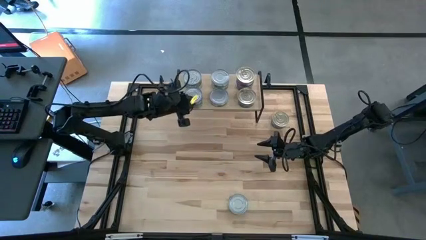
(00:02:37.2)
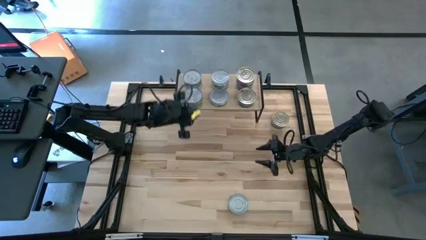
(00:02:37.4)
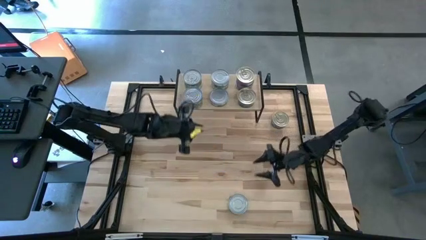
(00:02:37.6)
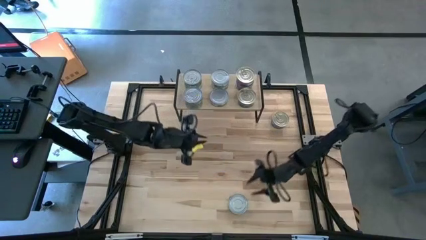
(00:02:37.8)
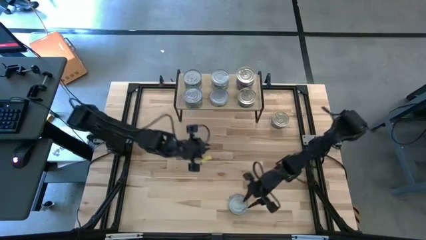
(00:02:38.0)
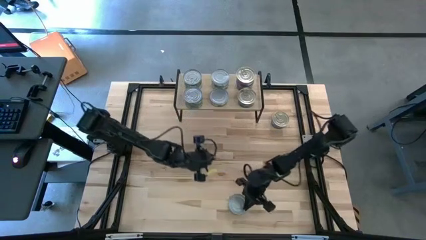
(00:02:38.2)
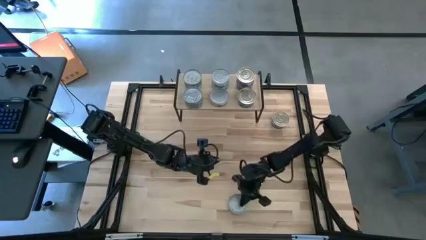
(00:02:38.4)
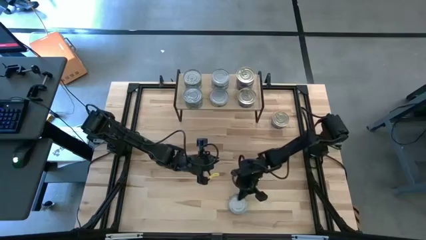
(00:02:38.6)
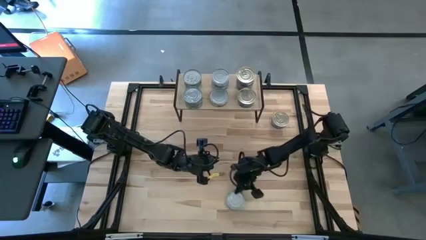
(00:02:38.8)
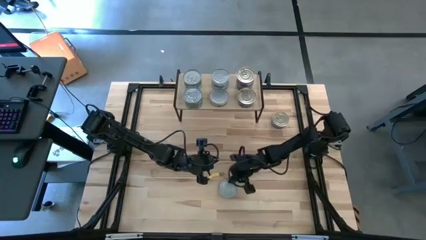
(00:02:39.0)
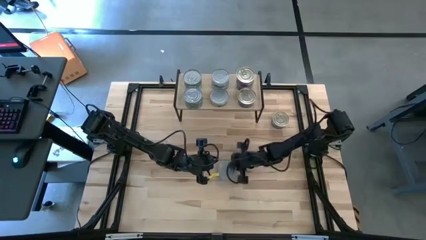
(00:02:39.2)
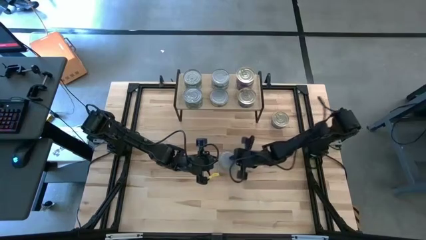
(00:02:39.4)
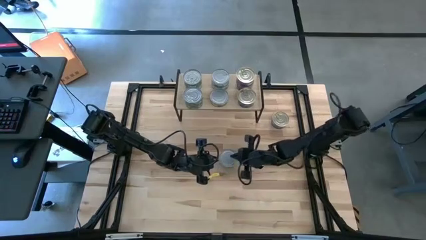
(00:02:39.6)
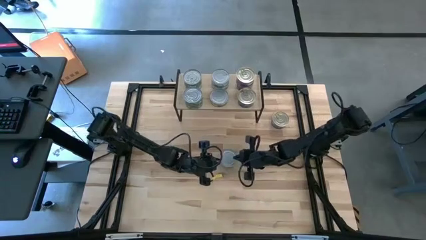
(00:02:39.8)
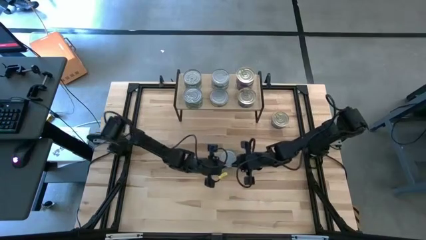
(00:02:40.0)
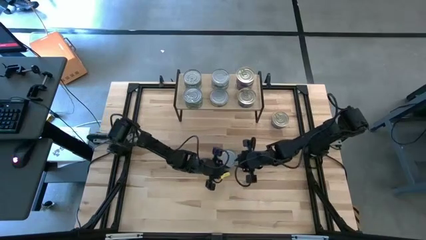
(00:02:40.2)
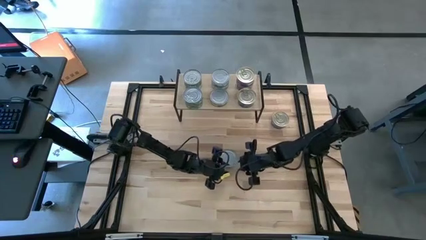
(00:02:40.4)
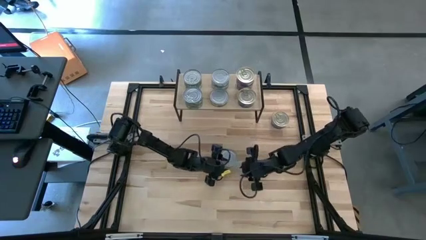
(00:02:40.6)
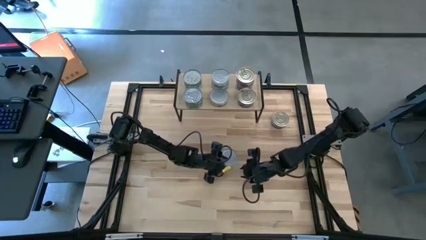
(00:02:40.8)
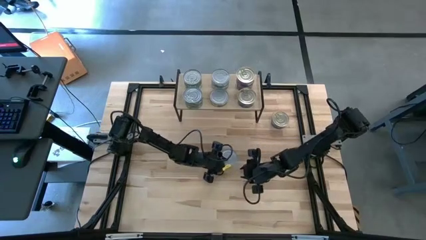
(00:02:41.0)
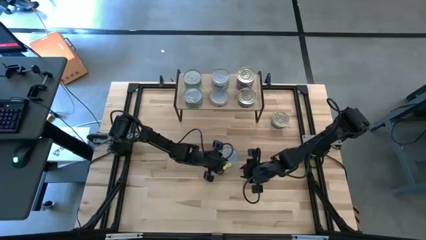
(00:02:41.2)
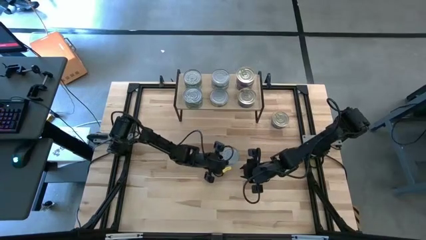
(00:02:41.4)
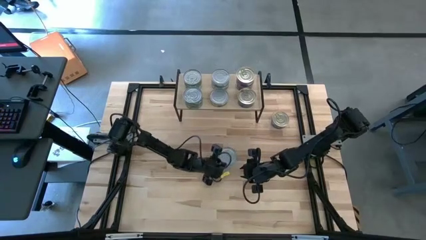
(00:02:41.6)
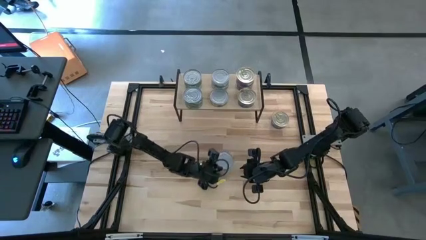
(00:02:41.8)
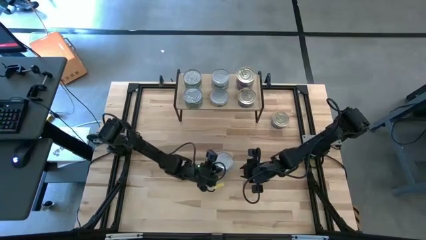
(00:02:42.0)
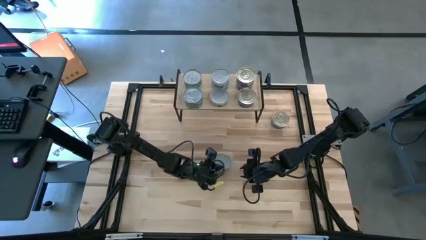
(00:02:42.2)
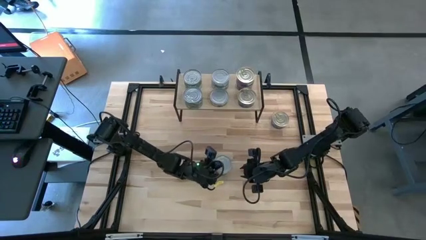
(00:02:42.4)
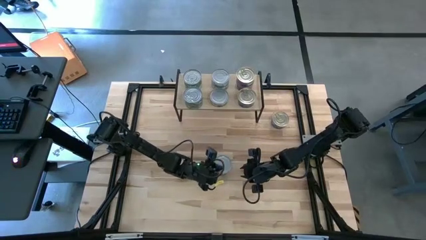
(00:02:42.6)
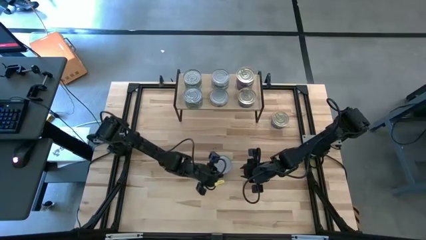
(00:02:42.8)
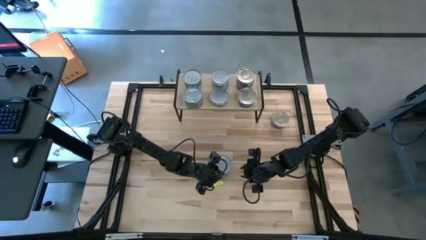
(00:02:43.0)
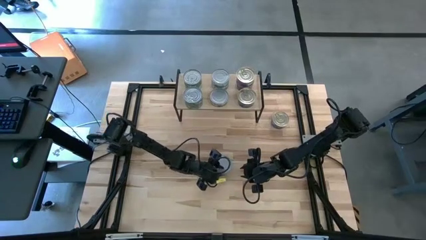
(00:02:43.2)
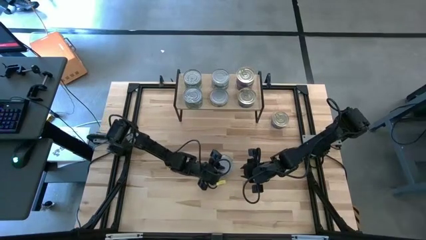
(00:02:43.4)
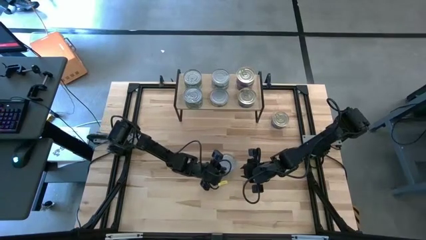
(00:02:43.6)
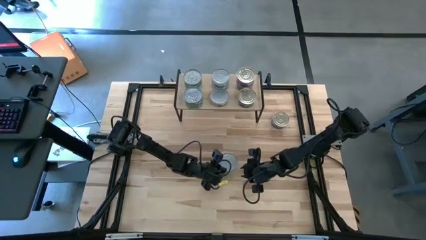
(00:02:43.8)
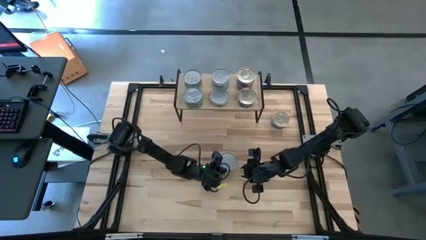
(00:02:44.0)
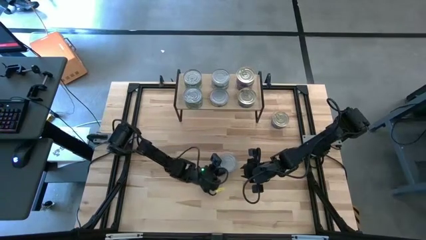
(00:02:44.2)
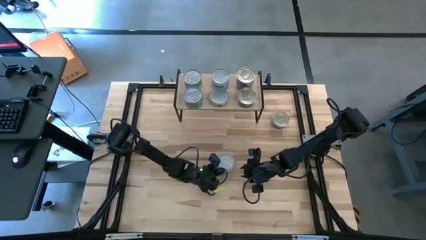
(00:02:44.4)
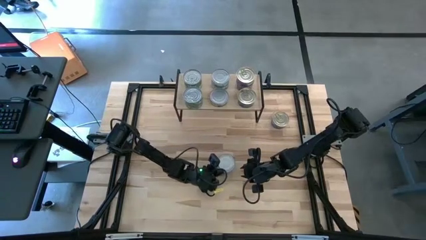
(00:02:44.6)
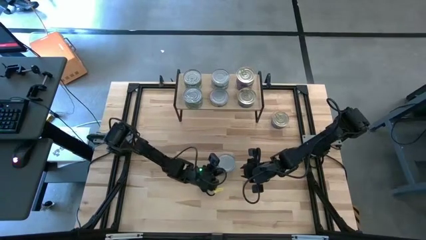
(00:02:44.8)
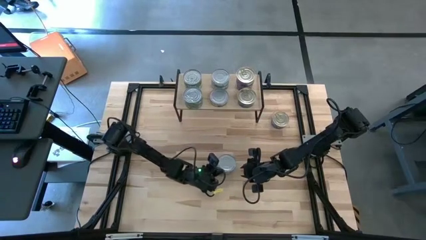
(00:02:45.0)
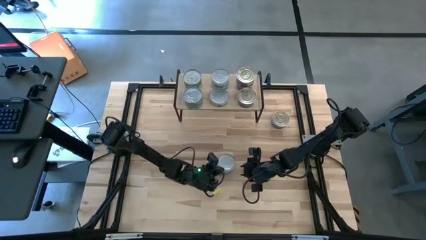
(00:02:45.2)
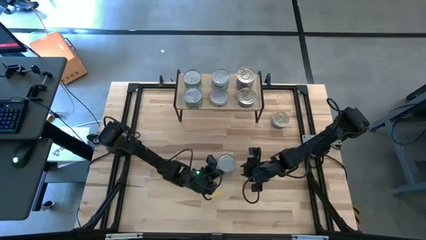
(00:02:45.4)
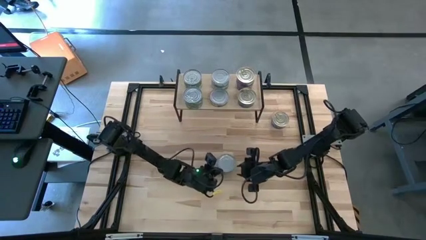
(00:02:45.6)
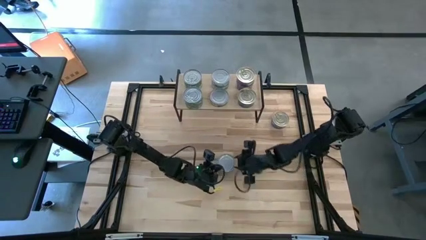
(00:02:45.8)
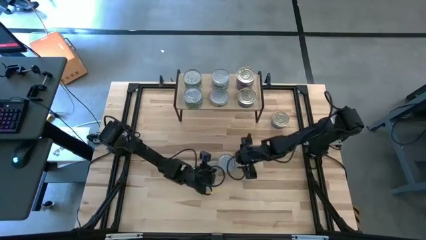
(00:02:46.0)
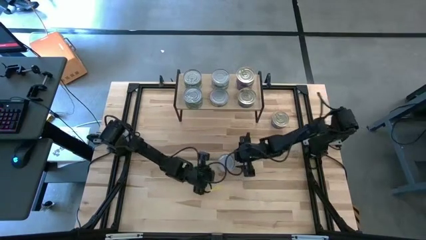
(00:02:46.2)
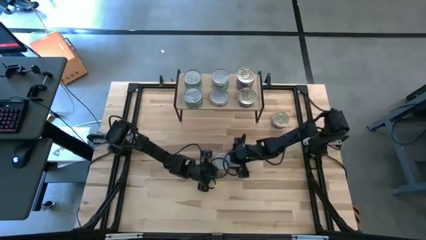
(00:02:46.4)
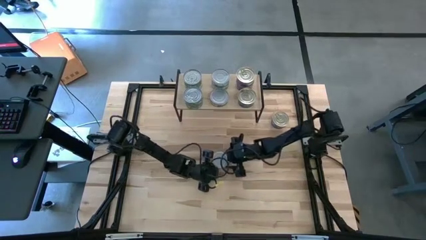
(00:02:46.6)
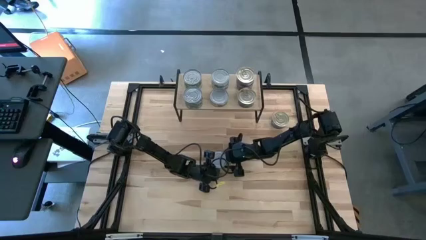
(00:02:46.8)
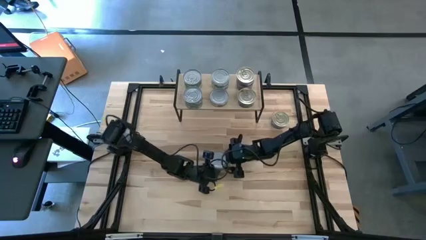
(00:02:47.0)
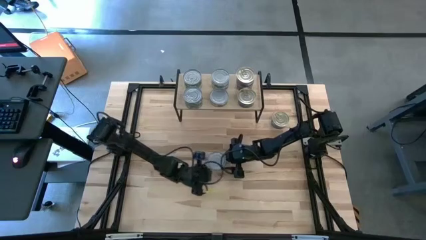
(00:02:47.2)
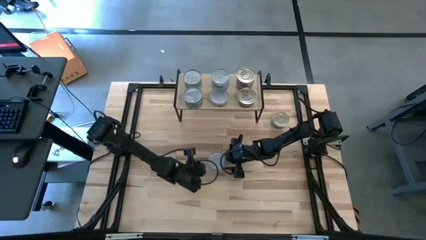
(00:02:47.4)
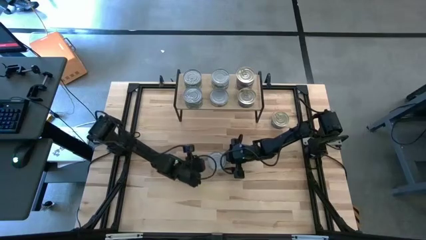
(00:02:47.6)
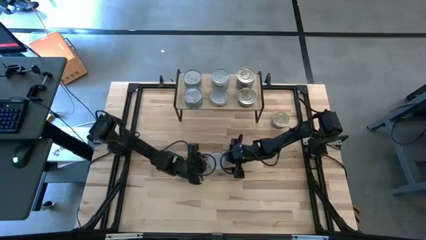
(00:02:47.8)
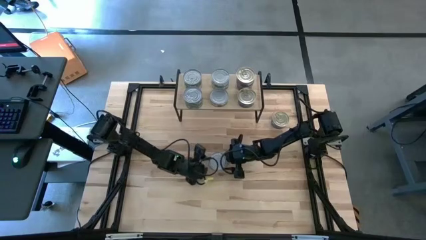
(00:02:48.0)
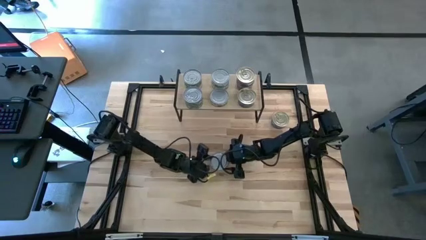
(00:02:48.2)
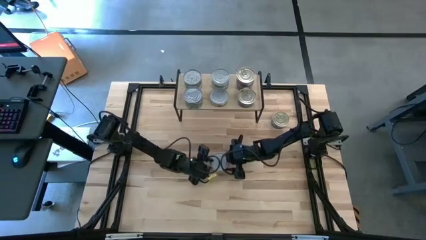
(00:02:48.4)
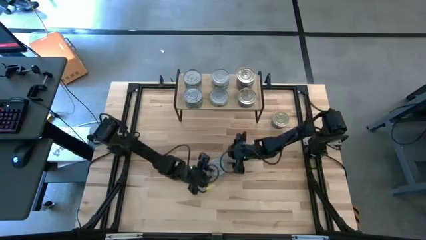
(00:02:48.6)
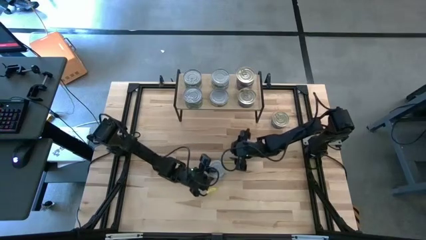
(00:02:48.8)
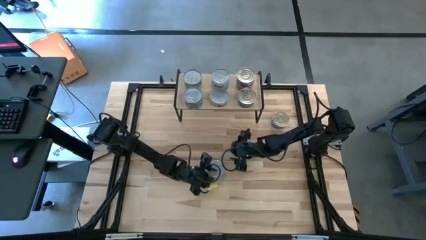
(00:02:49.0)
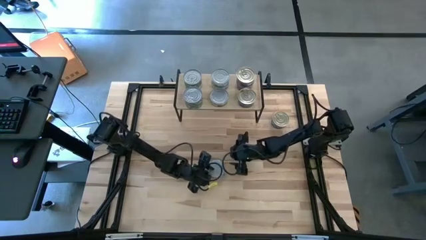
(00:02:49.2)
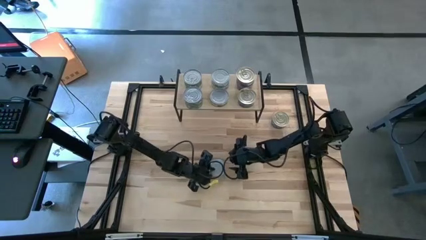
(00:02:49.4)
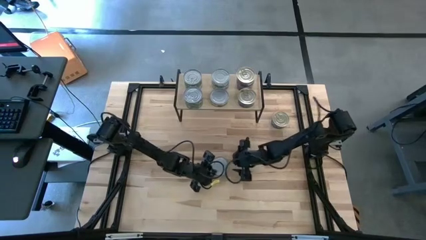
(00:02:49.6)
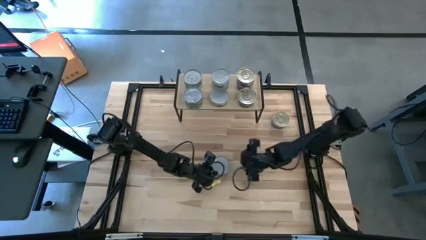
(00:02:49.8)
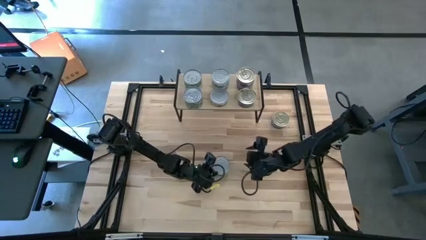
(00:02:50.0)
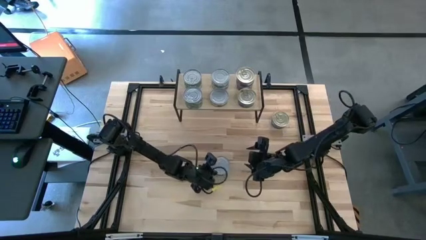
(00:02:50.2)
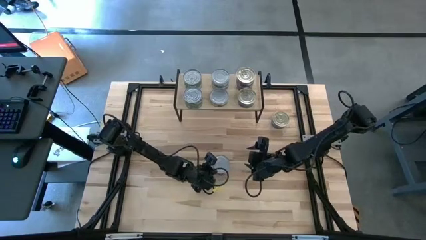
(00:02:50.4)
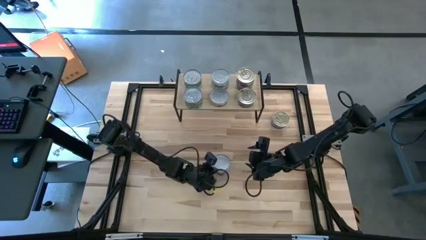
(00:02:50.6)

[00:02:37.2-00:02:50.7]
Task: Stack canned seafood by type on shelf
Stack the light green tuna can on top of the bottom light green tuna can on the shelf
